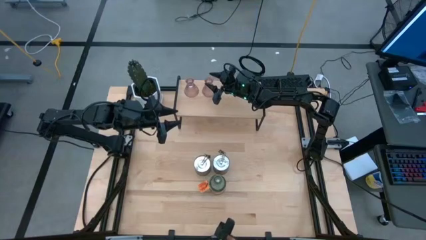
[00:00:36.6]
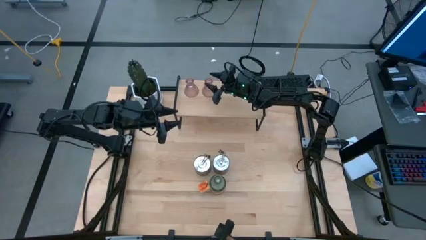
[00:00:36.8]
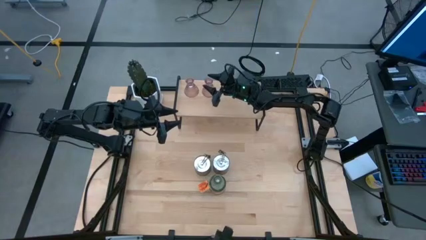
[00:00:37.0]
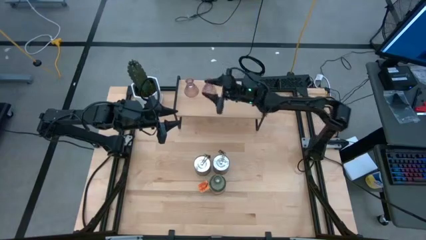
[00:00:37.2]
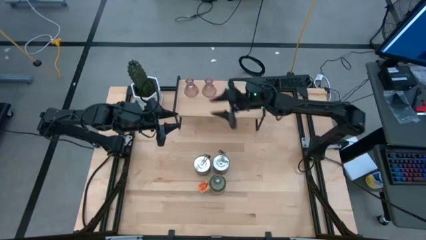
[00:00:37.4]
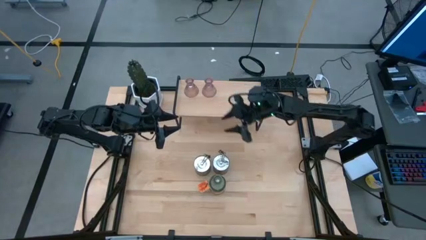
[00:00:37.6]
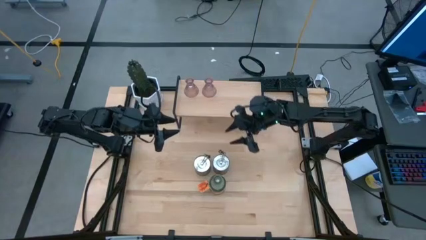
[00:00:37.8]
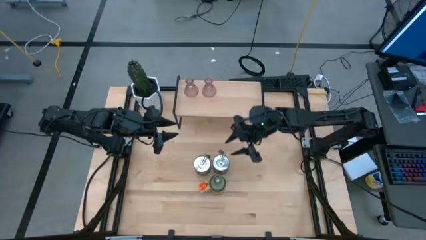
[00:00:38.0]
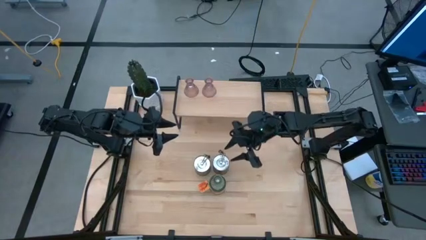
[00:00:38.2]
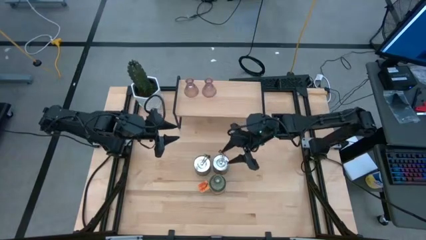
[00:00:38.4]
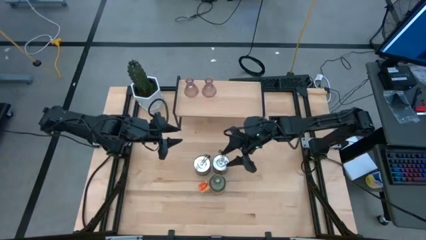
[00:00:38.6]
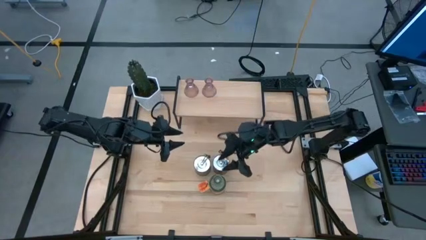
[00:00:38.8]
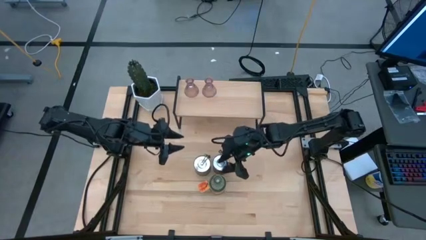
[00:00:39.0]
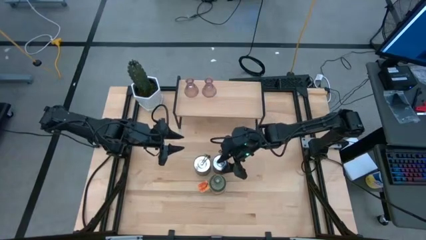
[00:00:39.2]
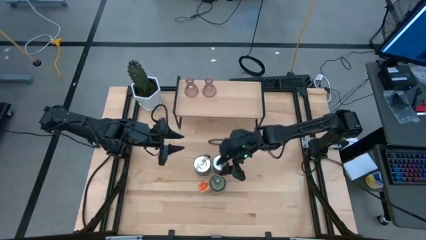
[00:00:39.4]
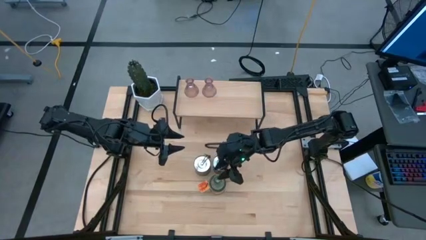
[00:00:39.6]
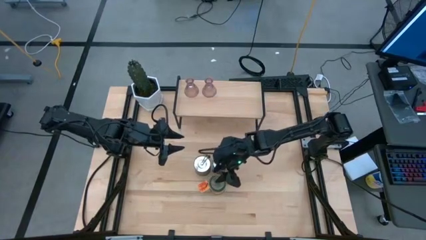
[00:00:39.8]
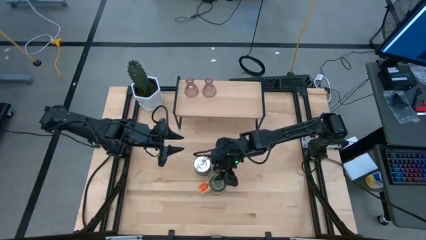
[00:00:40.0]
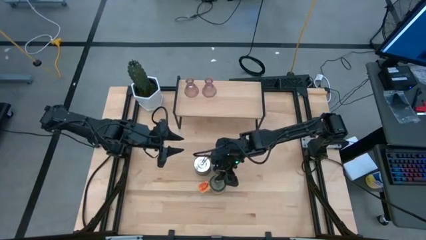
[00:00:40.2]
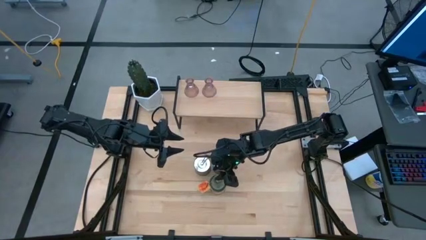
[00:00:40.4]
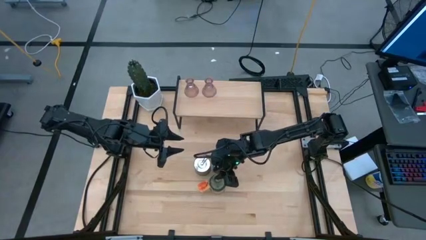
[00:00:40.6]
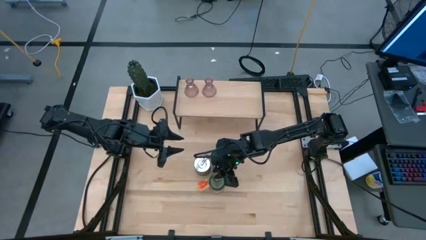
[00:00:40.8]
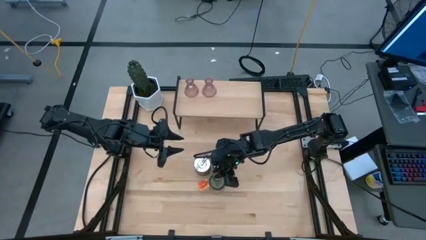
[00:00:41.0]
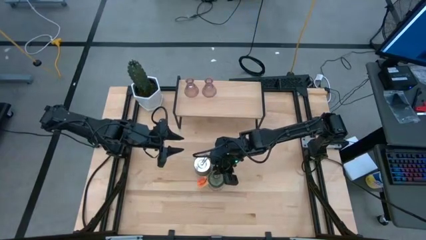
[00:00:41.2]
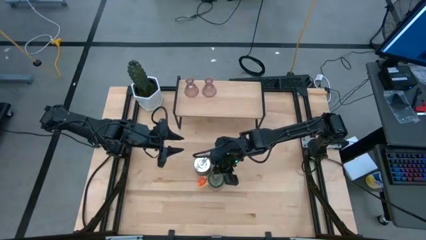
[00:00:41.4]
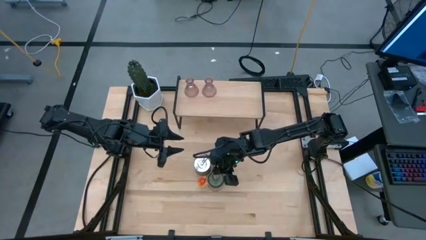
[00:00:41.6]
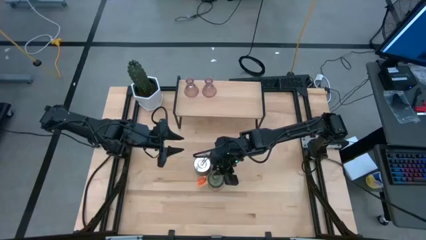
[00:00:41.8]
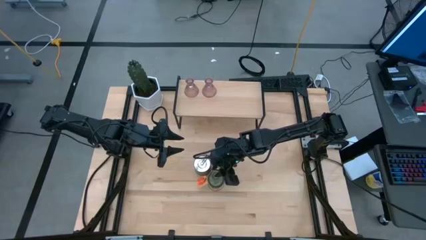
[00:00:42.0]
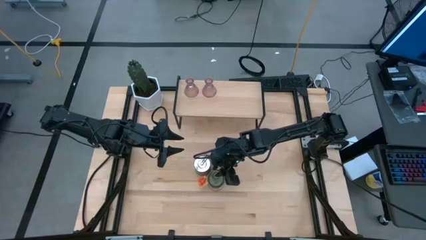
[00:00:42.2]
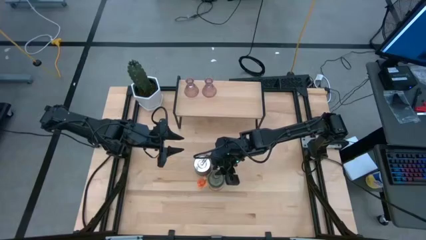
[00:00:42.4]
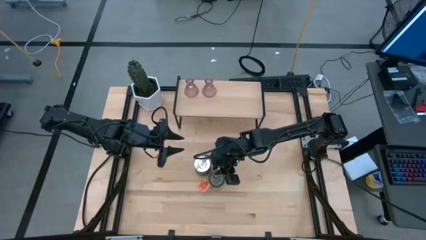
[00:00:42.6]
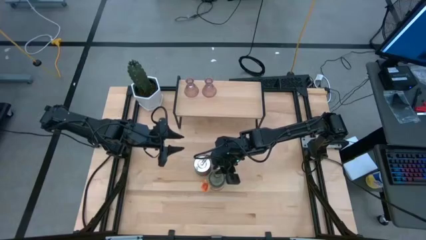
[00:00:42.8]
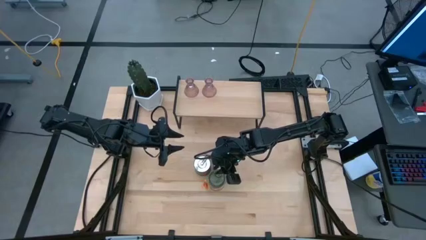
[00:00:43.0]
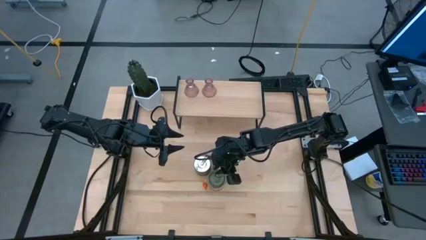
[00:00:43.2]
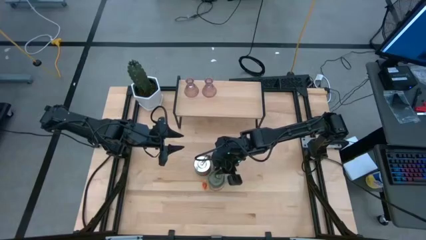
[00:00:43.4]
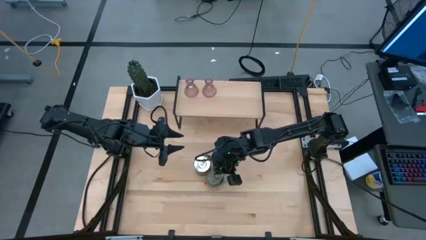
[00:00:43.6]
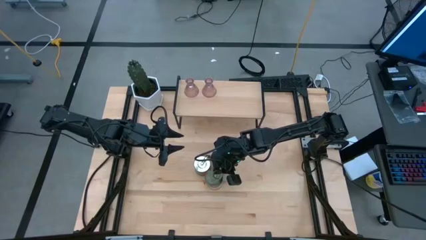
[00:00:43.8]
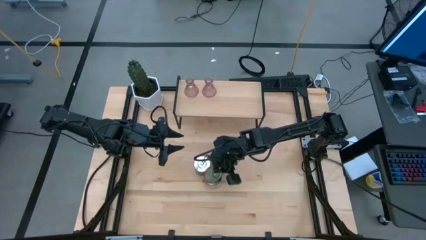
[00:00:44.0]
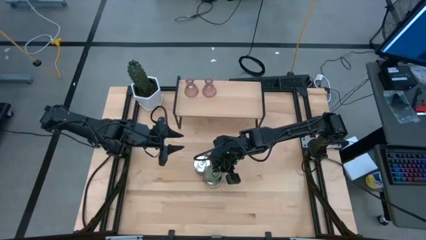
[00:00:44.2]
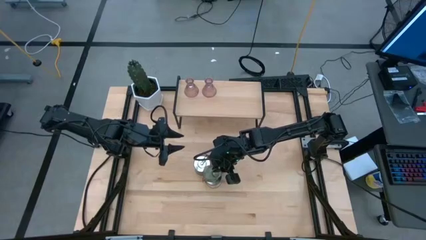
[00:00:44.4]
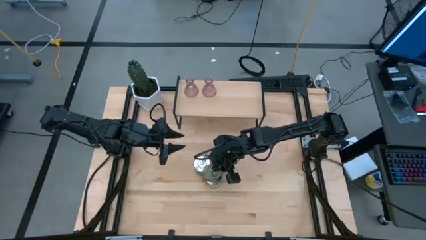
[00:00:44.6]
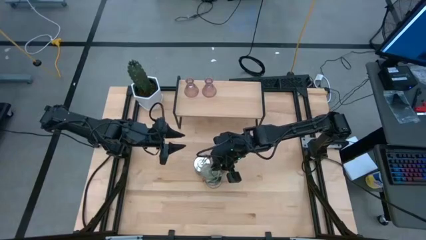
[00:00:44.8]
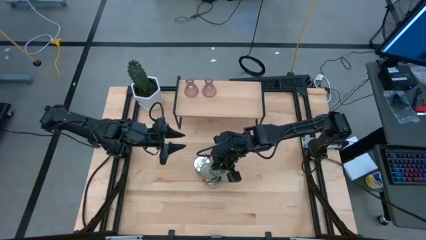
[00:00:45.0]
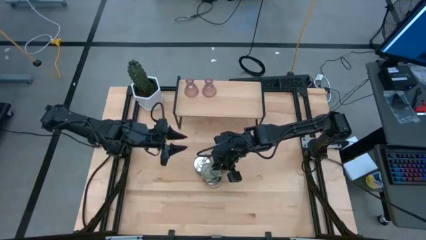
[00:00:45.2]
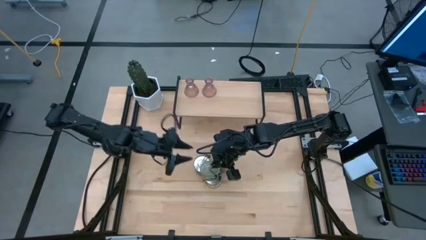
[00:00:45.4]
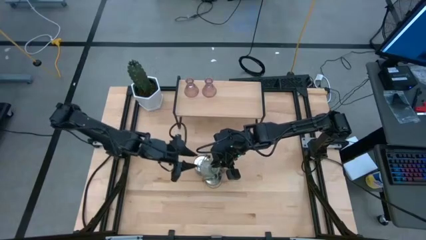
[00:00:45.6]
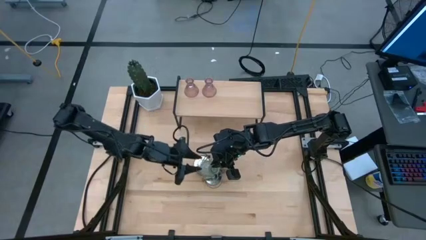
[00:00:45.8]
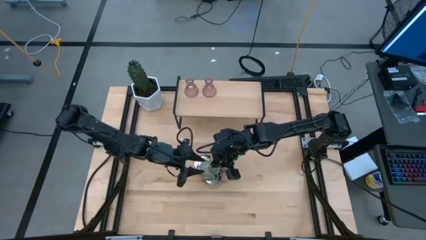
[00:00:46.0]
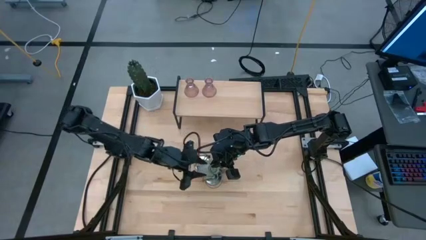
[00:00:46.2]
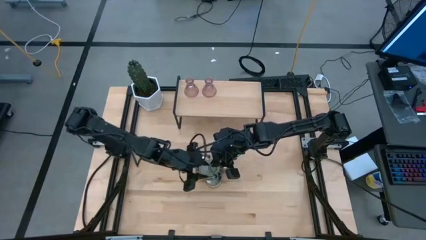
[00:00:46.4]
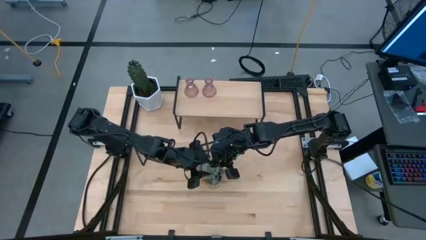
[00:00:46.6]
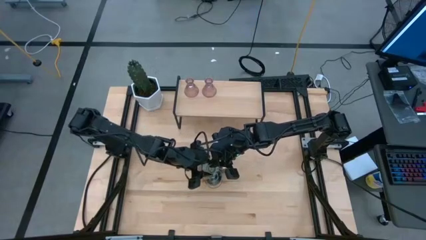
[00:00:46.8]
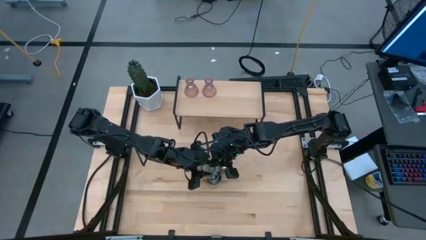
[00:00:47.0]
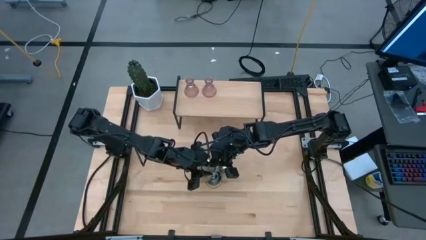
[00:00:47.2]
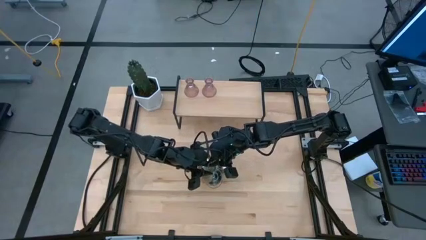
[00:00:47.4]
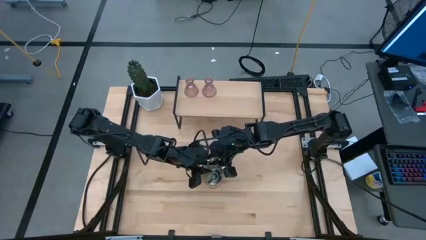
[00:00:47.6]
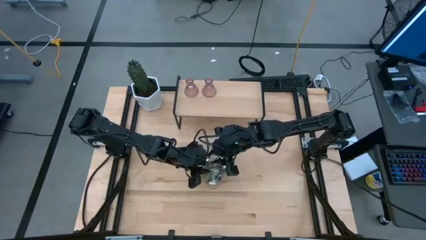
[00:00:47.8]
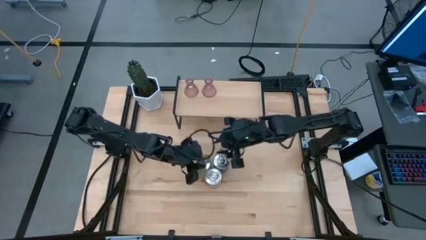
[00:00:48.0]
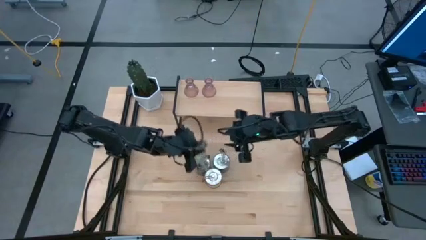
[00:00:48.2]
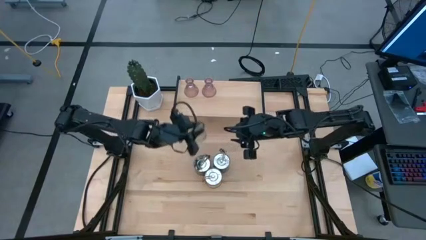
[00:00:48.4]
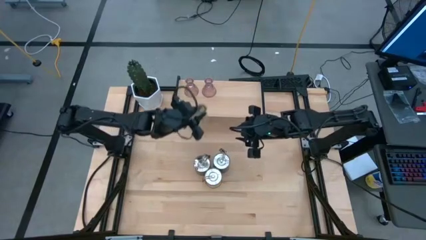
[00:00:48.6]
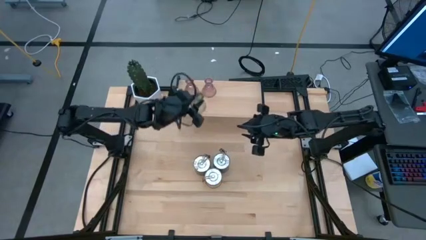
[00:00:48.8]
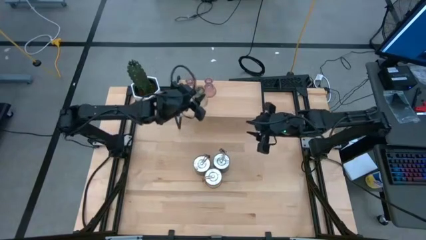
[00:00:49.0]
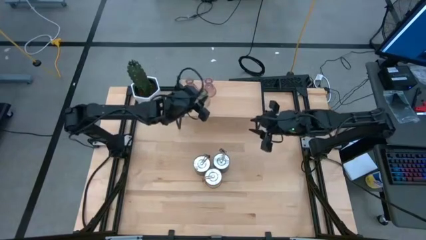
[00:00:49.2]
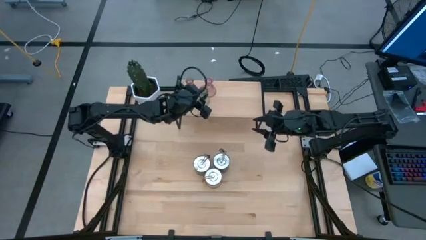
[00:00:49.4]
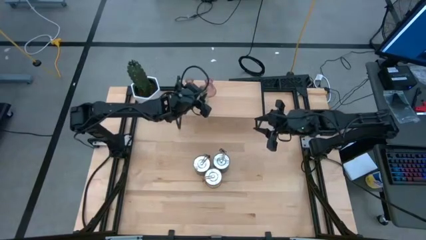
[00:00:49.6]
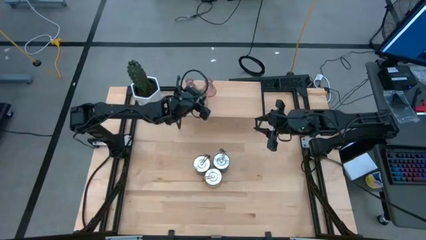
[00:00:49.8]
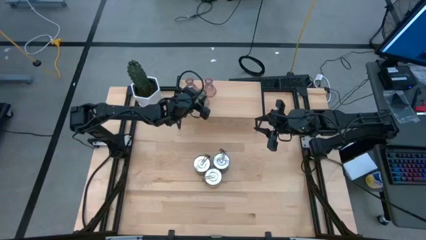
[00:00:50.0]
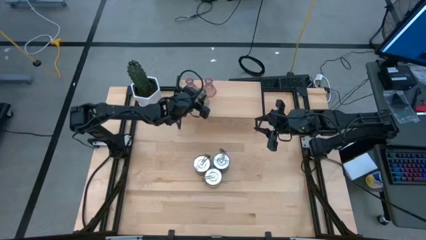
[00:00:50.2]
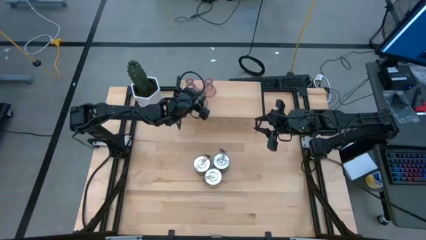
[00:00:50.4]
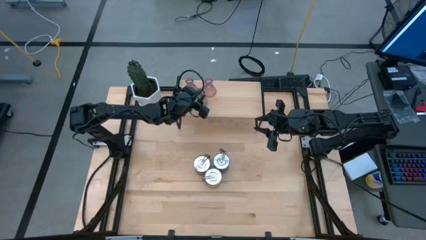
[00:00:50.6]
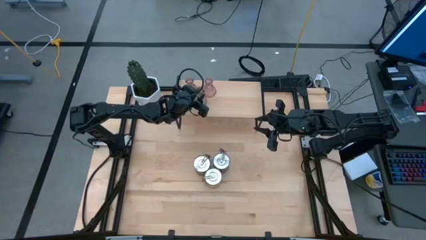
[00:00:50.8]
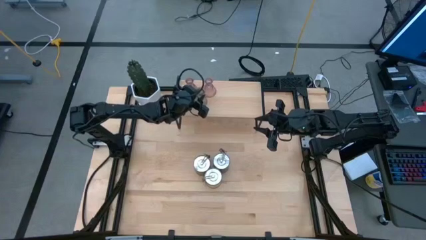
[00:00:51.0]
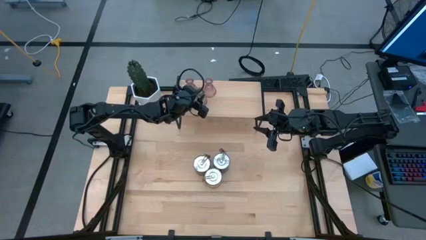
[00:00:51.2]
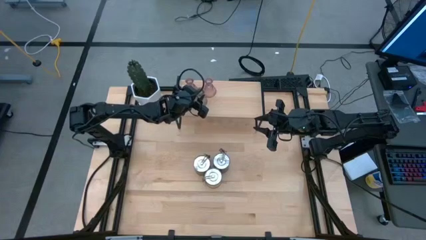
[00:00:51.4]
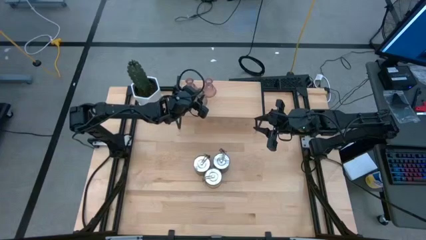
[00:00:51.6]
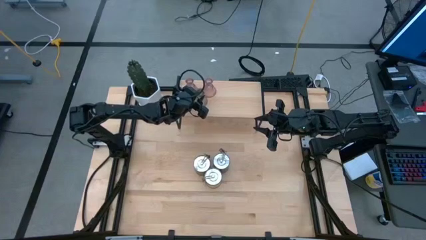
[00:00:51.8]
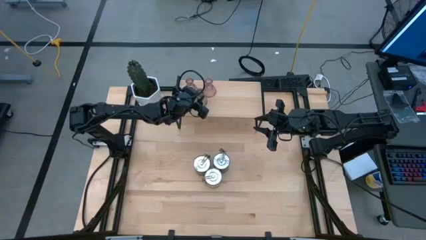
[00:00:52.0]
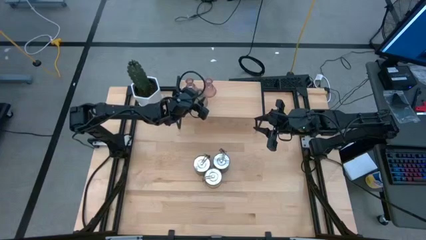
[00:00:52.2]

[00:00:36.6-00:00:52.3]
Task: Pick & Place candle stick holders
Put the green glass candle holder on the shelf
